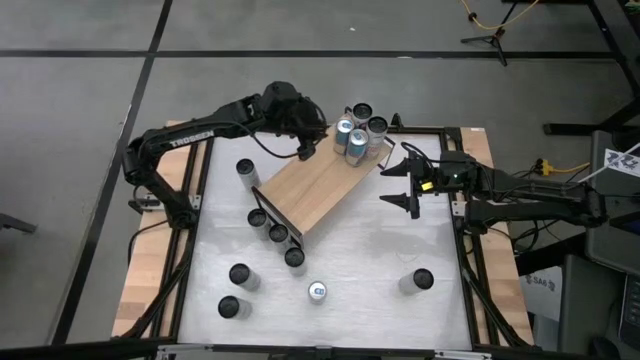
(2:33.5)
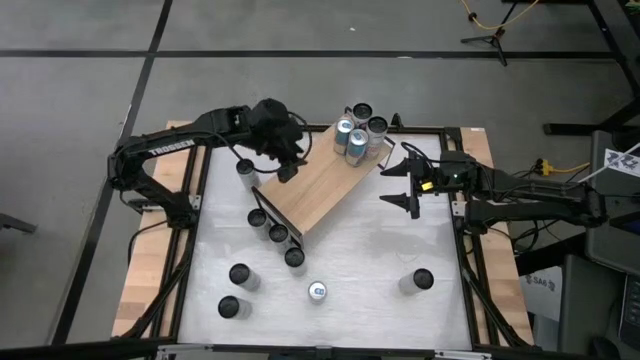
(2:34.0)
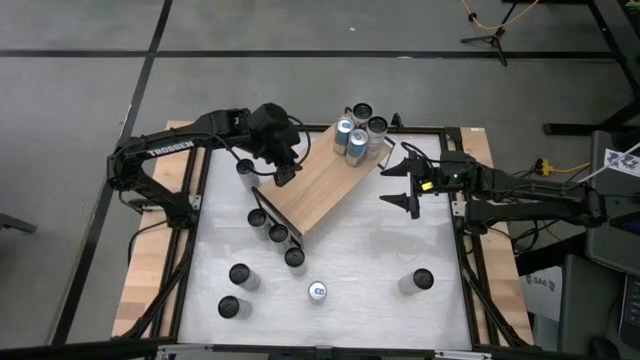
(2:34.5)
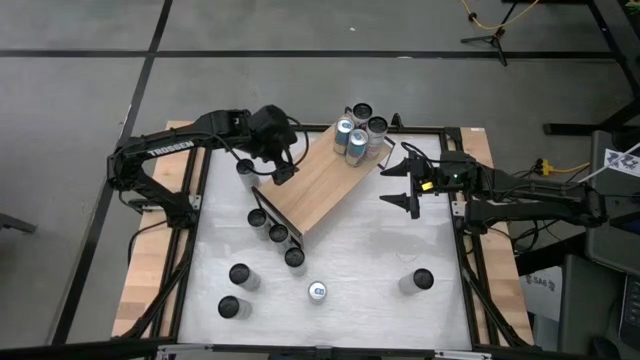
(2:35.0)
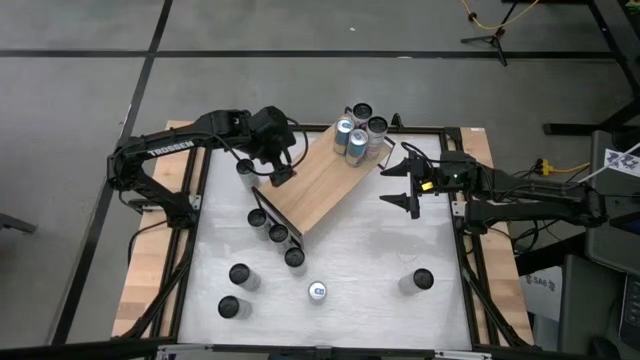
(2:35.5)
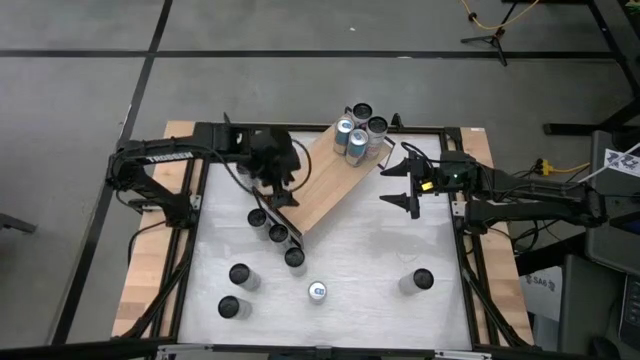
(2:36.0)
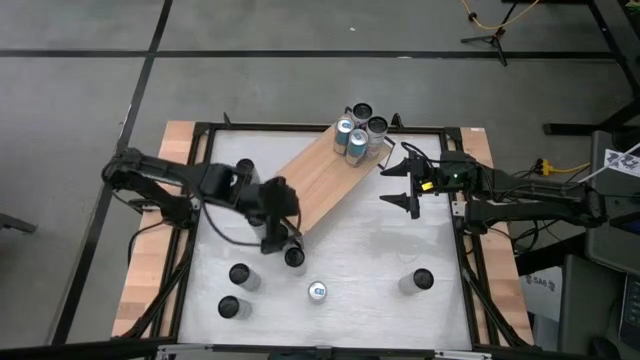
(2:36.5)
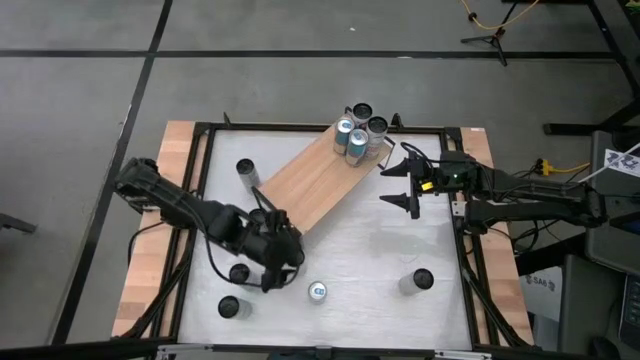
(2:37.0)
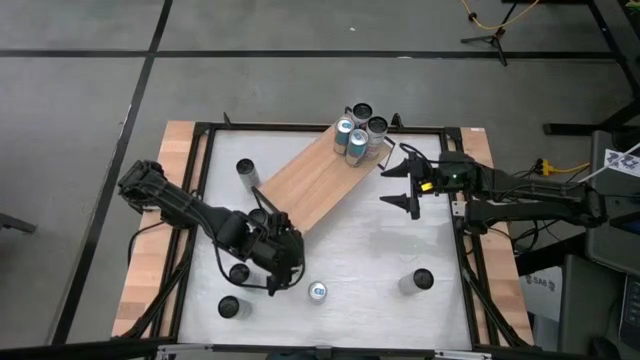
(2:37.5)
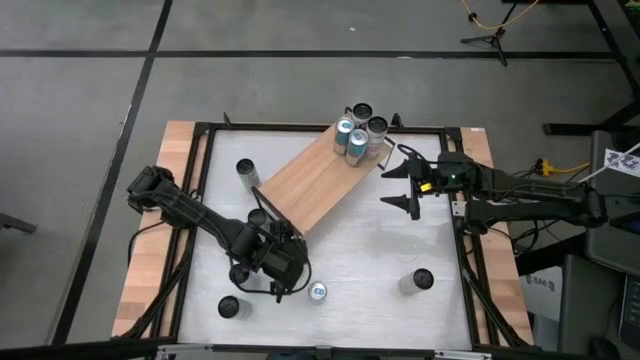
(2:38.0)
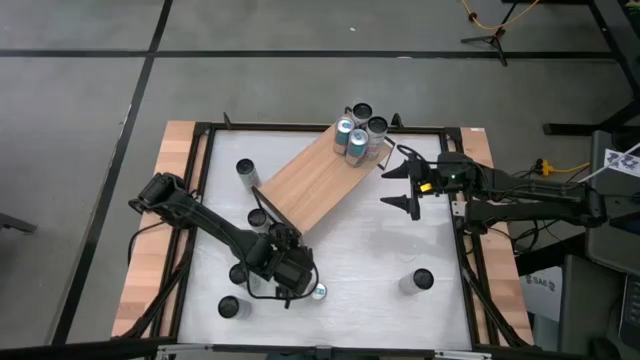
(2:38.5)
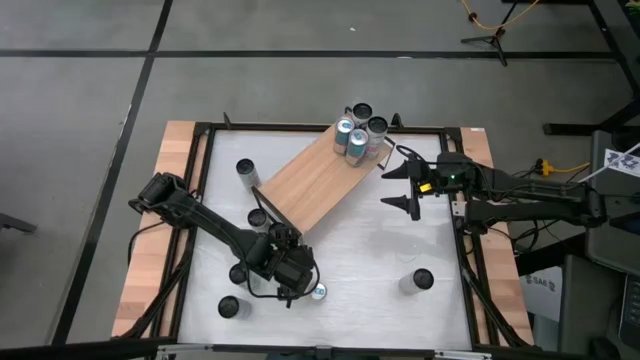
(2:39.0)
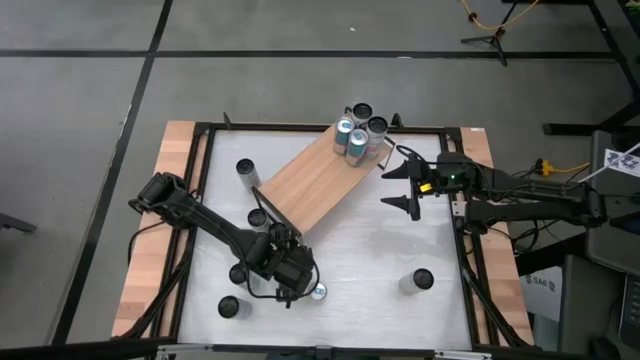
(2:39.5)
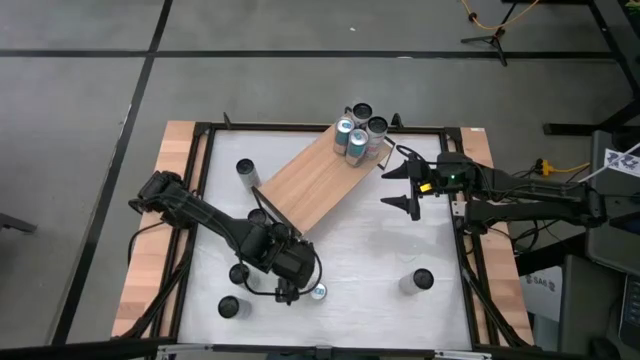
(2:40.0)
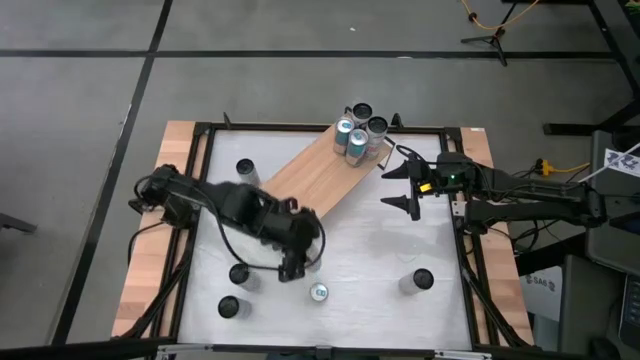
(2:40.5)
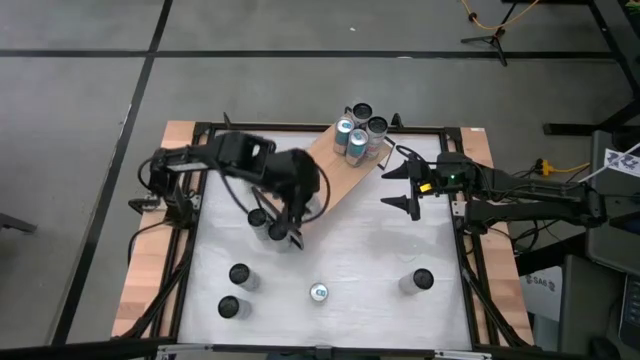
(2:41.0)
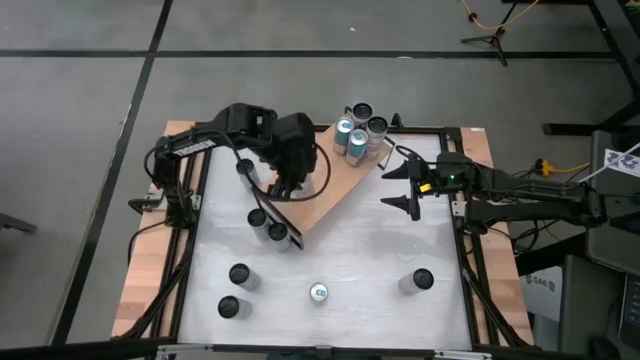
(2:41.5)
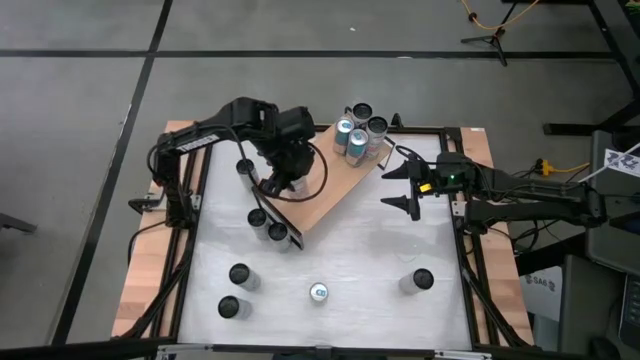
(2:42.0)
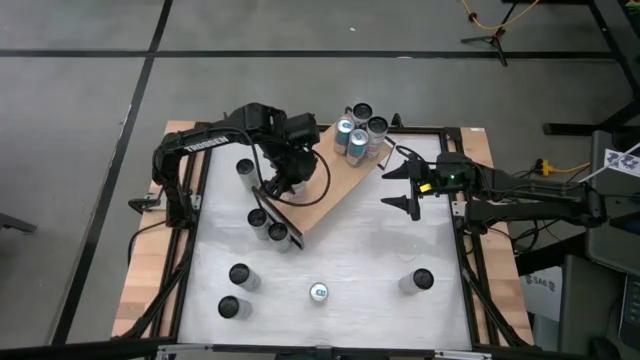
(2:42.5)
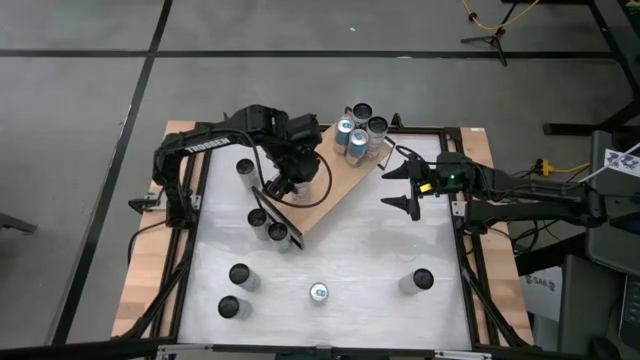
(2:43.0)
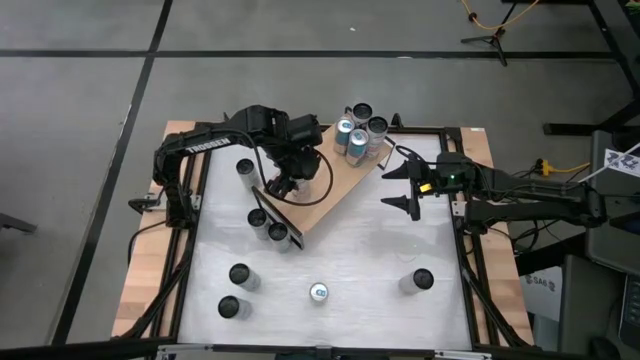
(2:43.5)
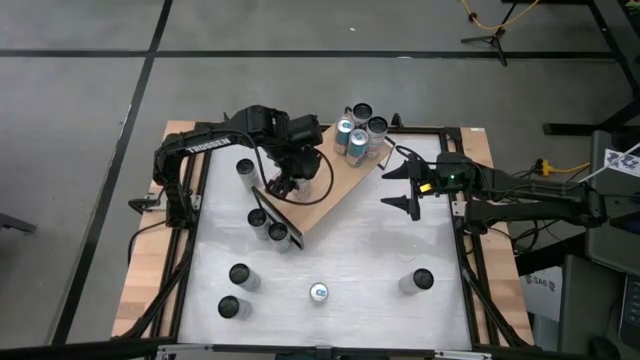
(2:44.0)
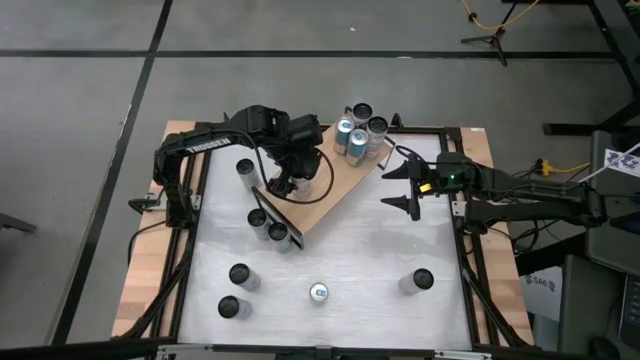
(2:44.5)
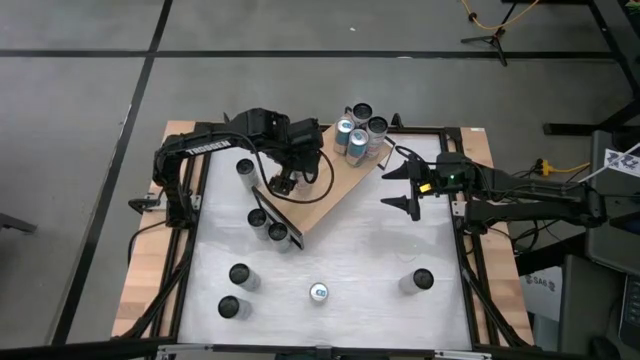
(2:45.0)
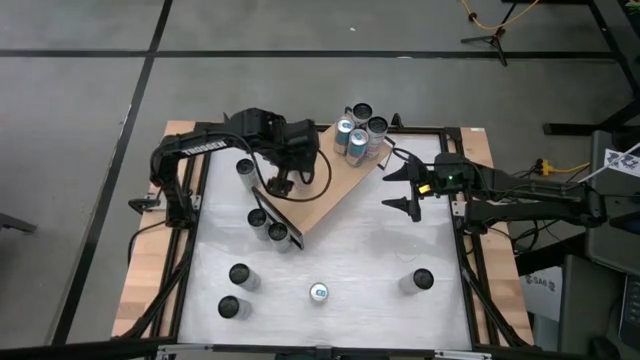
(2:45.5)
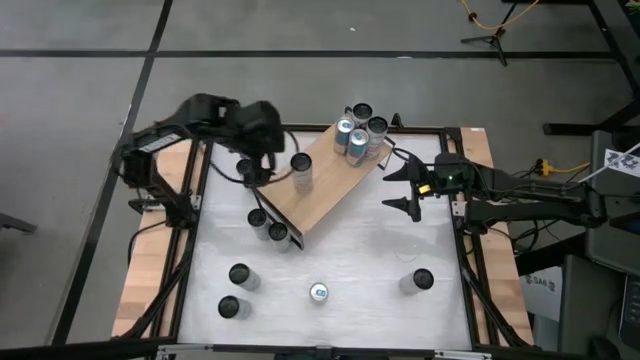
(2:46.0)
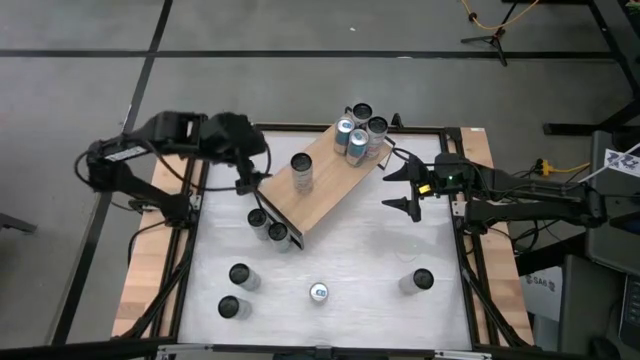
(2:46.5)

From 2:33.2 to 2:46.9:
Task: Place canned beverage on shelf
Put the white-pink soda can on the shelf aligned with the other white-pink soda cans

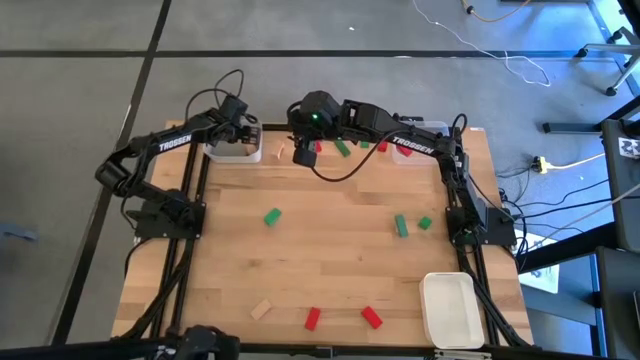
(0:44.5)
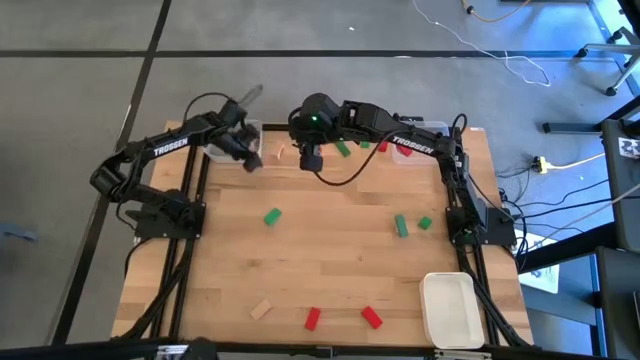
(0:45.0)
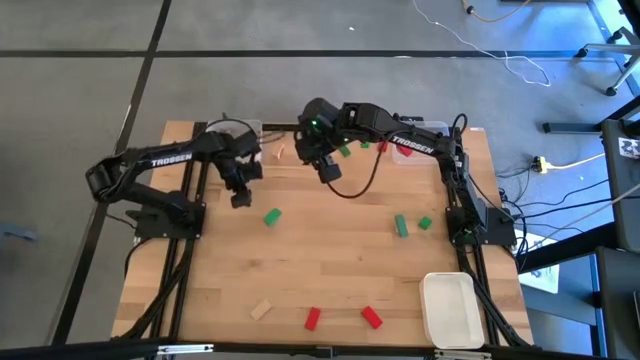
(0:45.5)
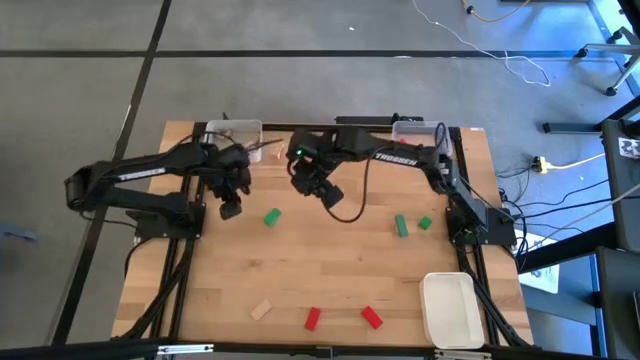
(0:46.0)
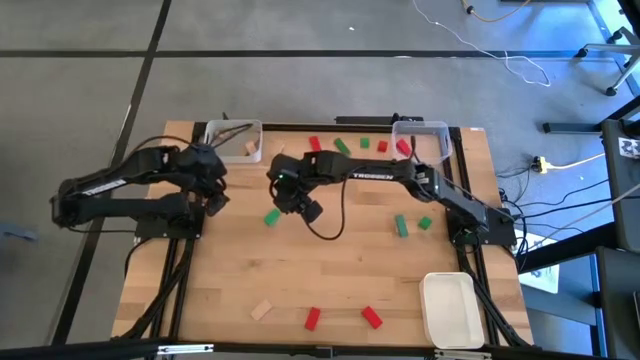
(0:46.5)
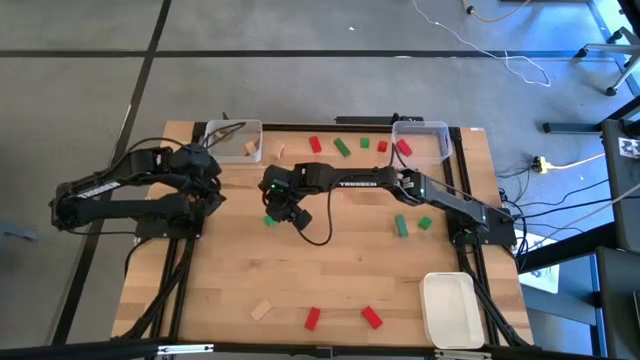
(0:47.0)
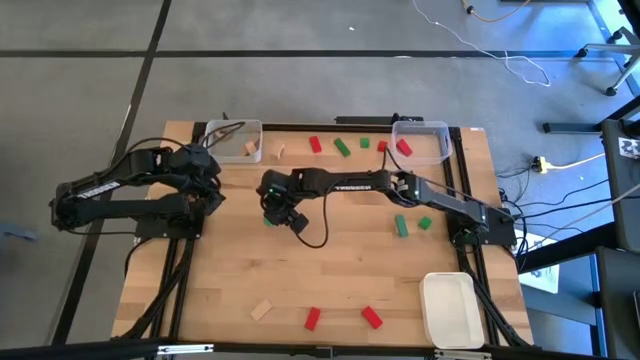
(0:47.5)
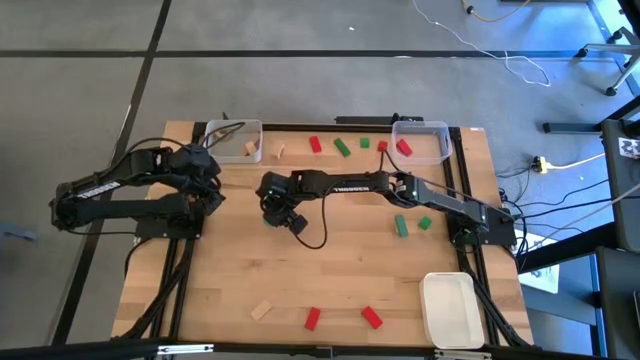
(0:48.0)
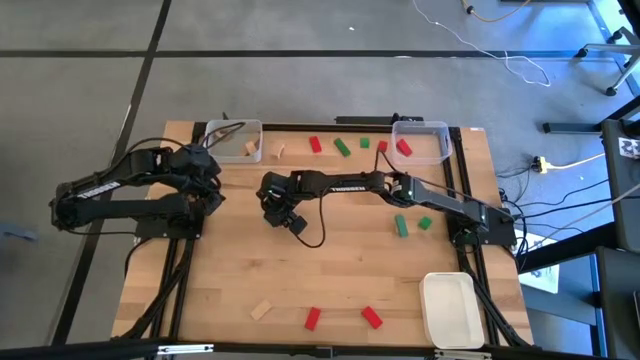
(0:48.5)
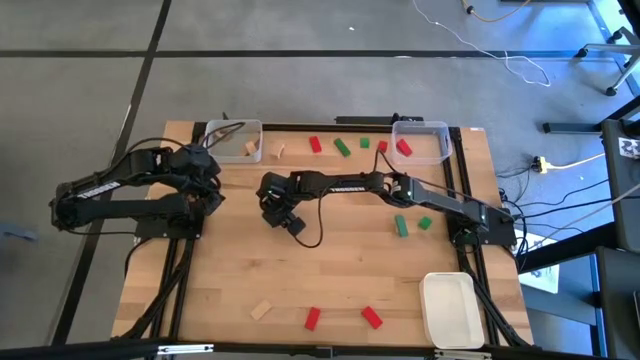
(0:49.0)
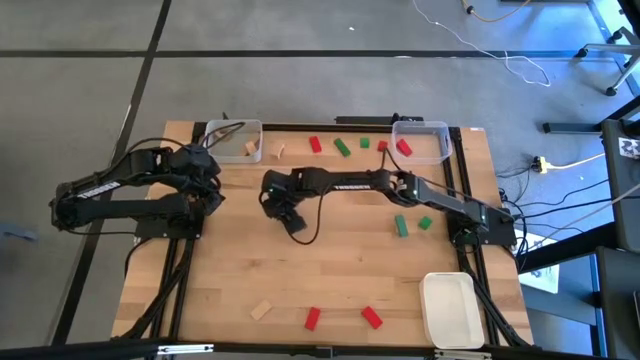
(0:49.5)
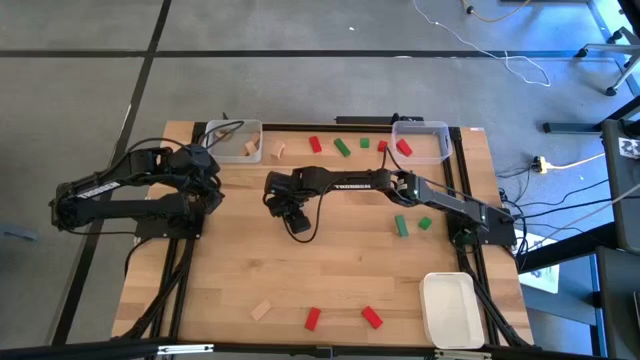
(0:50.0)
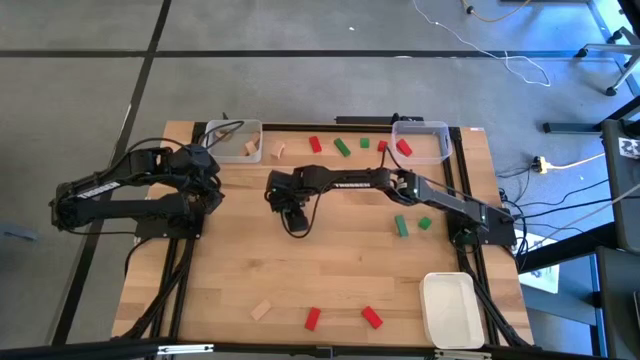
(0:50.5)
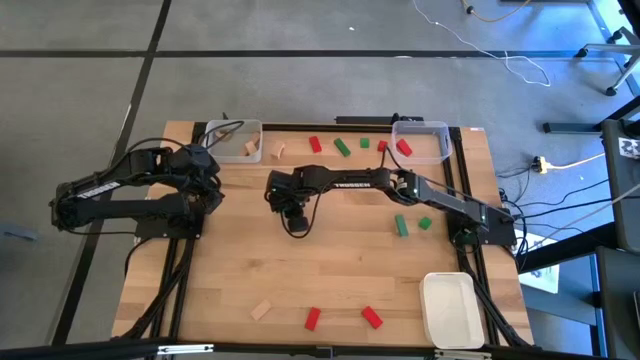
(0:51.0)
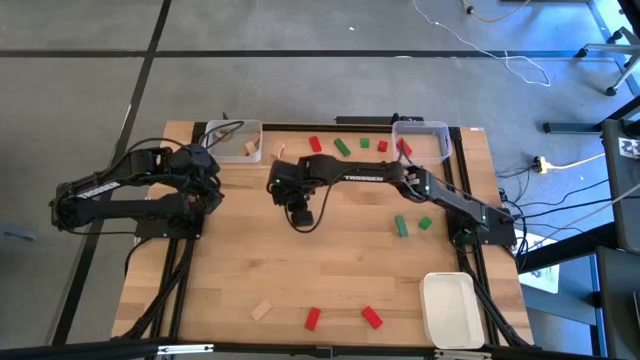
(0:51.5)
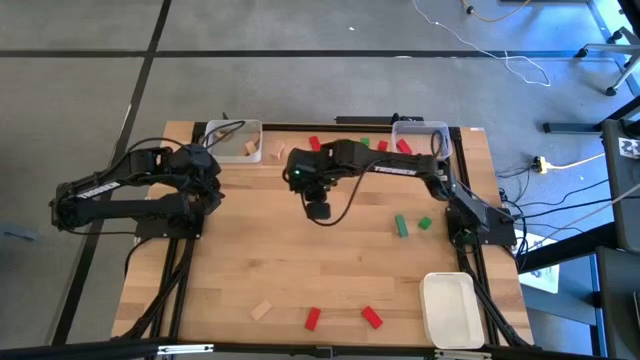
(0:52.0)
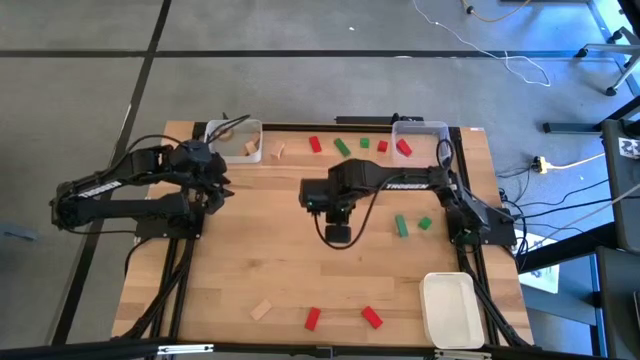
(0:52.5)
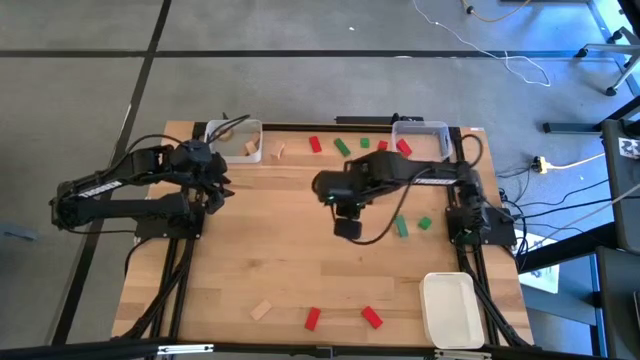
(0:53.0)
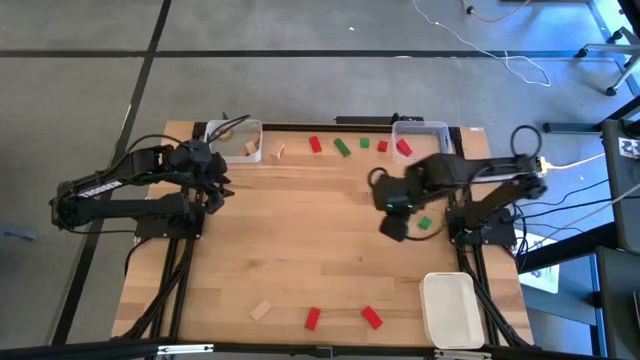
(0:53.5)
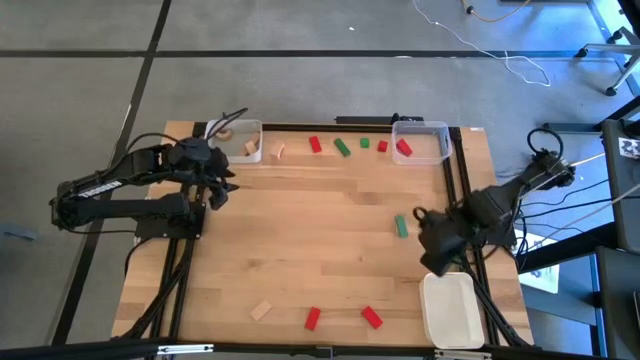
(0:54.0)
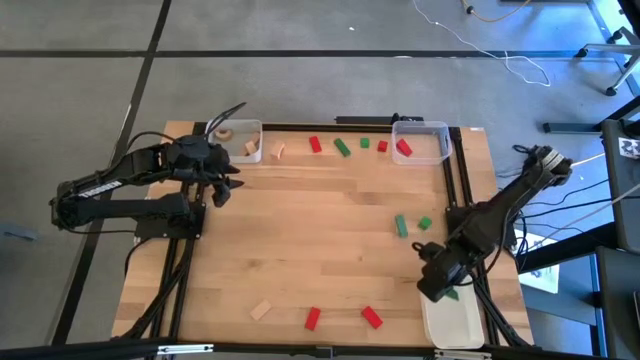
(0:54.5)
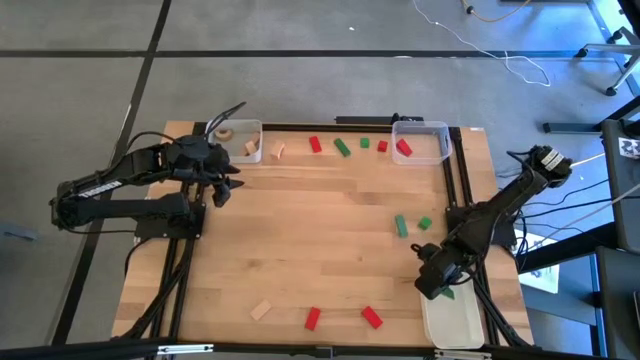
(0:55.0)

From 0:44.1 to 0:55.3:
Task: Sort & place blocks by color
Put the green block into the white bin
